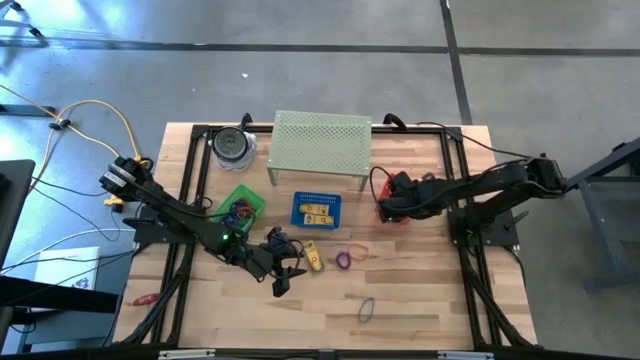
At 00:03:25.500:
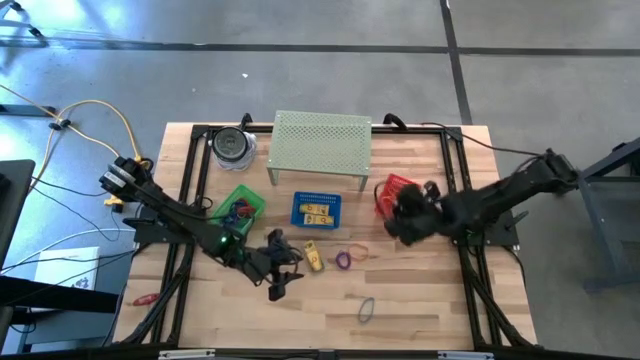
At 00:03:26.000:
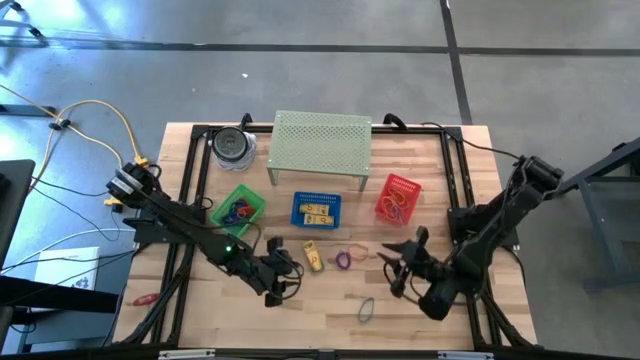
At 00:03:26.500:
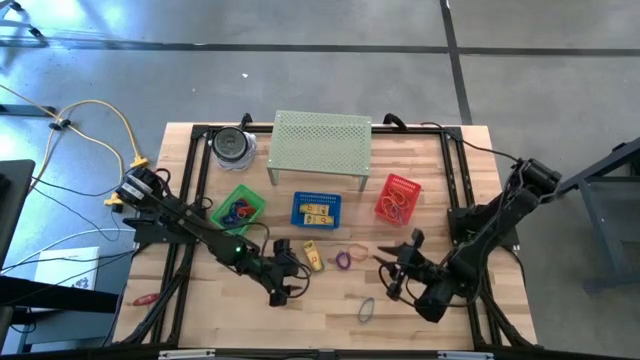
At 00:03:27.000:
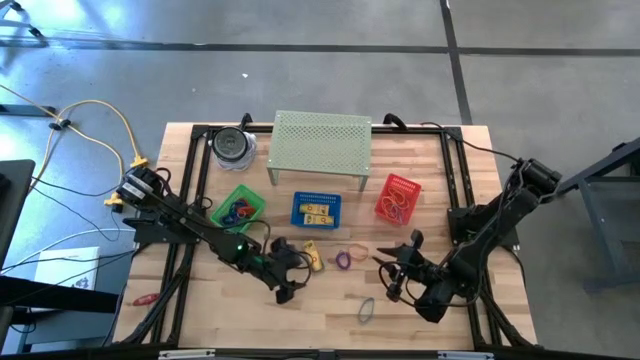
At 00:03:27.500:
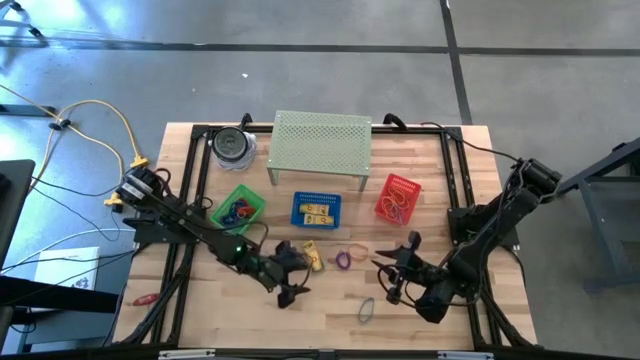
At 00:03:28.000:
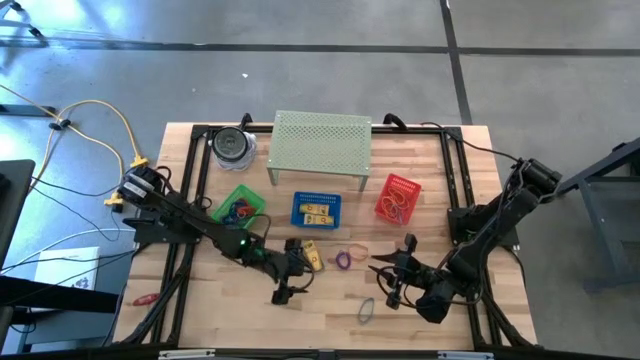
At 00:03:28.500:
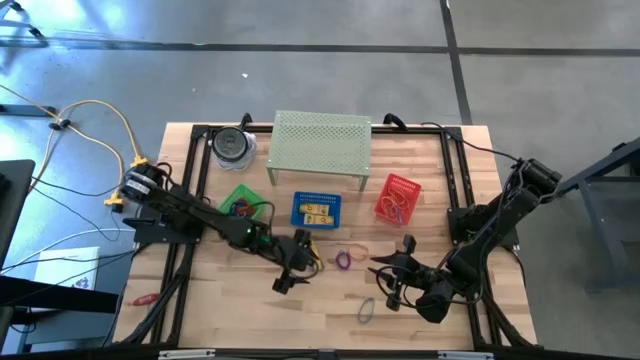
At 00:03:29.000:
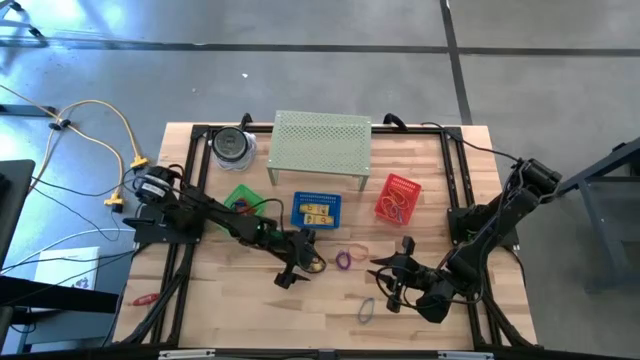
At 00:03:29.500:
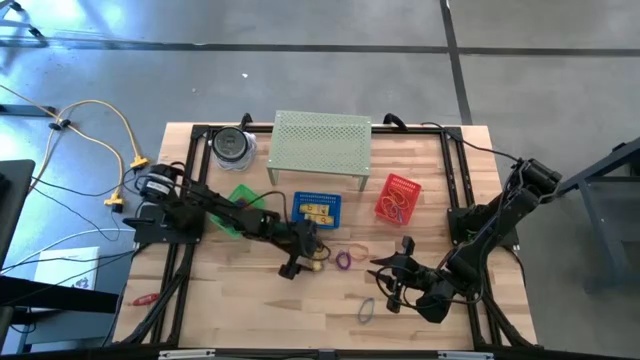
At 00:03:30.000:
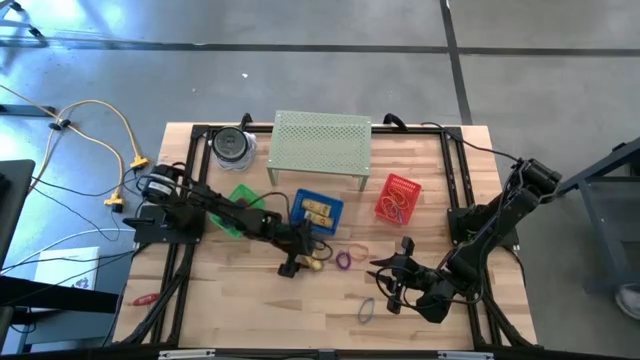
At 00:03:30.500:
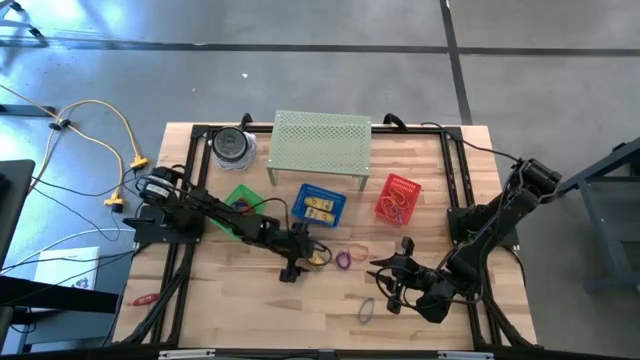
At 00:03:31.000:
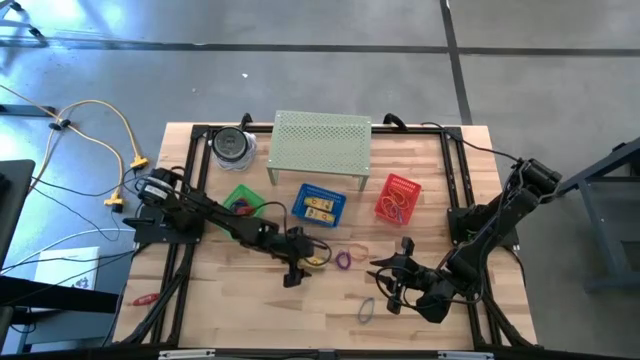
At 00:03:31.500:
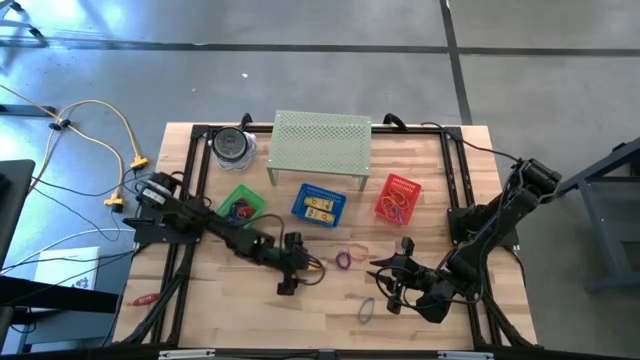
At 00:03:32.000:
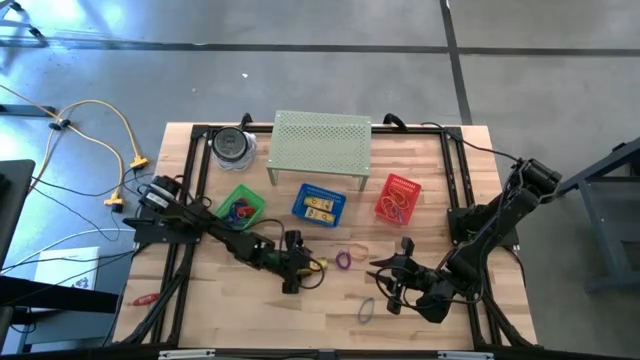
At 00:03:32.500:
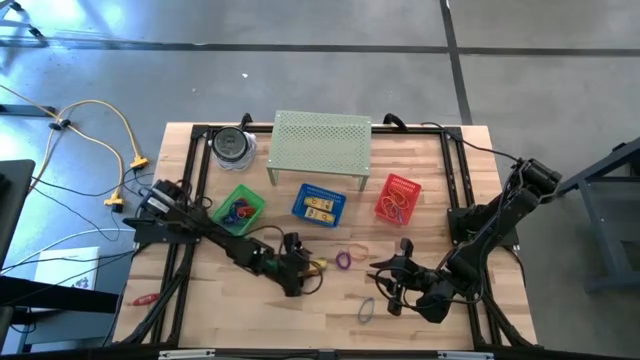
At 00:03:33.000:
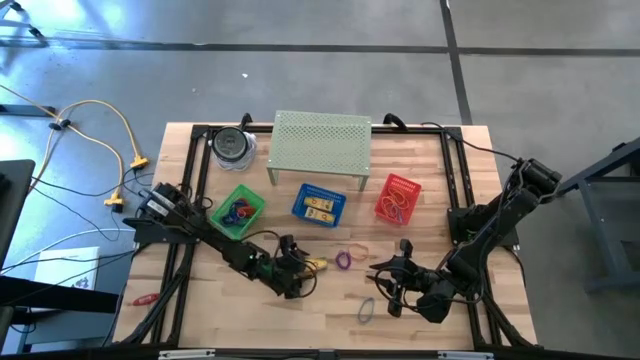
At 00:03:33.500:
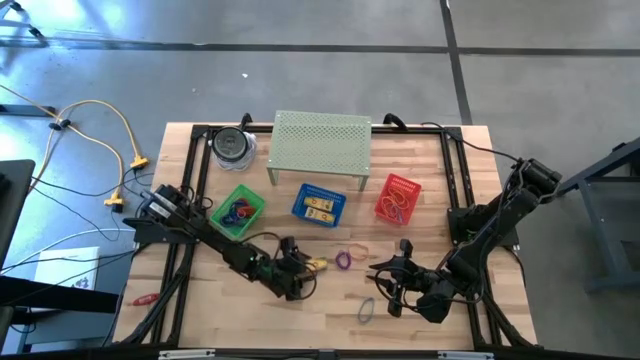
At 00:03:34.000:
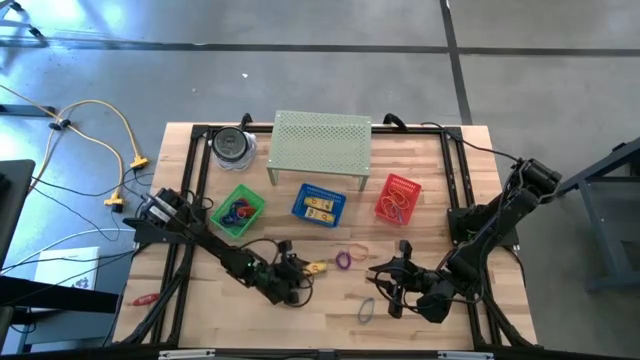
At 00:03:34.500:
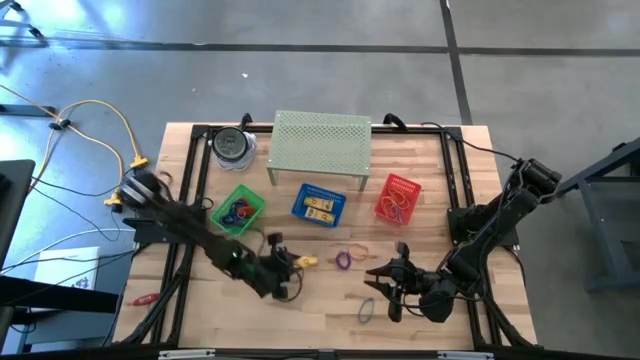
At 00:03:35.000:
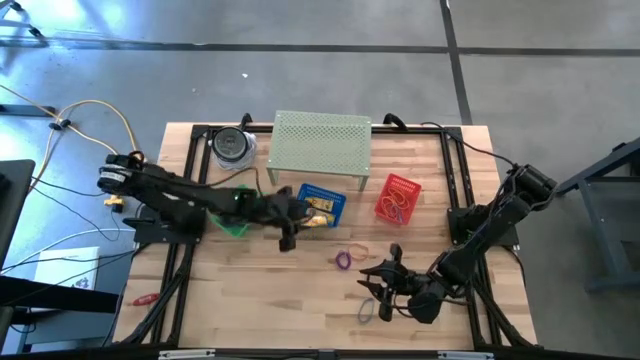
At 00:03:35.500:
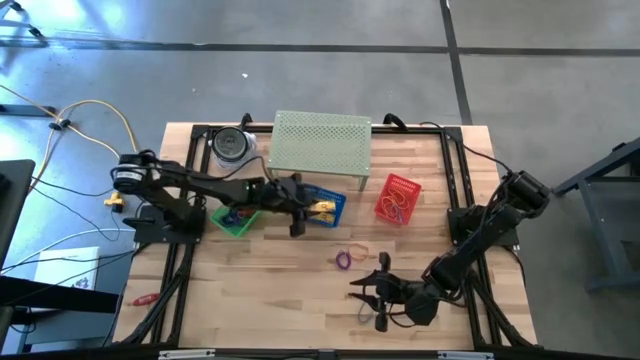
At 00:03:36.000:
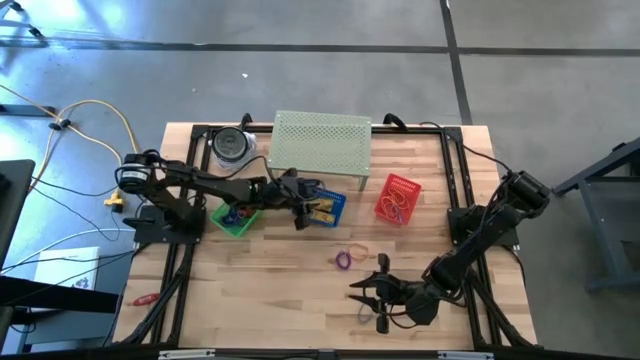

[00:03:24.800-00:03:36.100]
Task: Pick & Place Office Desk Supplies
Put the crayon box into the blue bin

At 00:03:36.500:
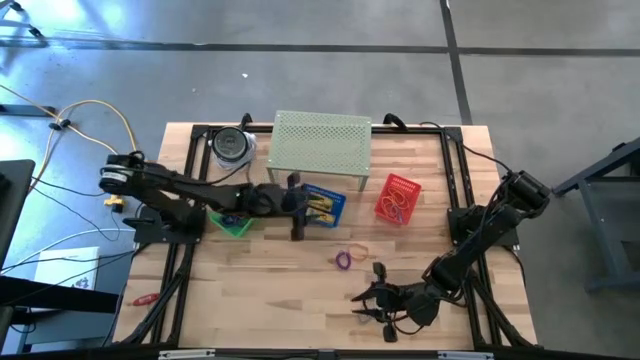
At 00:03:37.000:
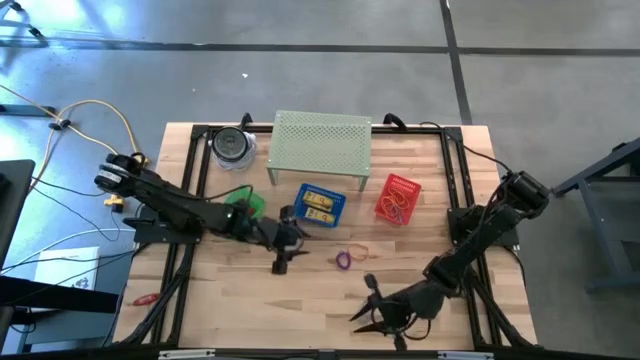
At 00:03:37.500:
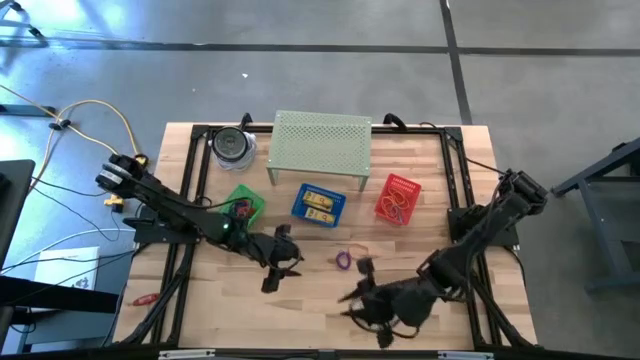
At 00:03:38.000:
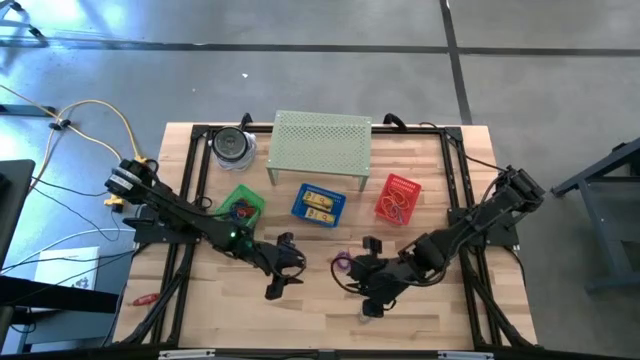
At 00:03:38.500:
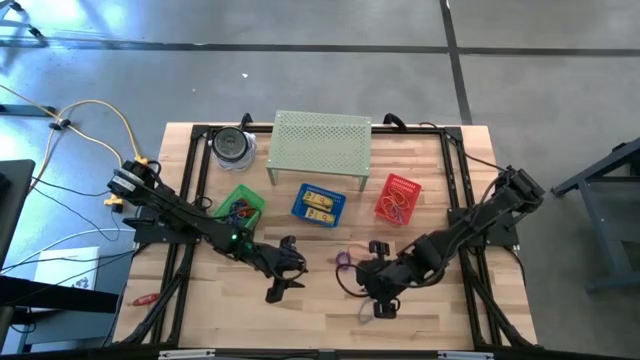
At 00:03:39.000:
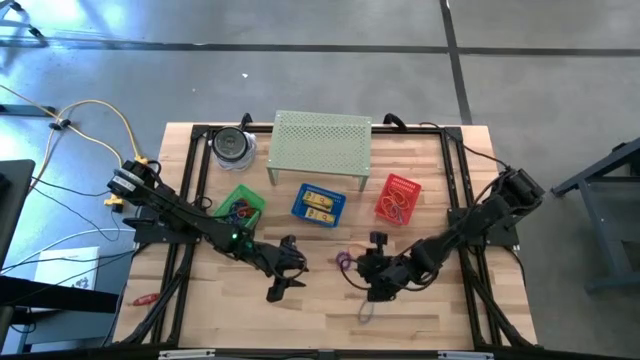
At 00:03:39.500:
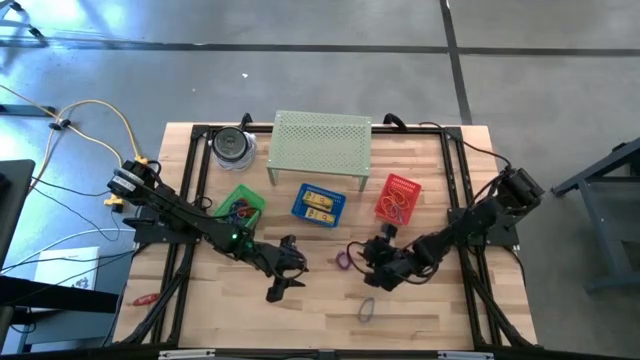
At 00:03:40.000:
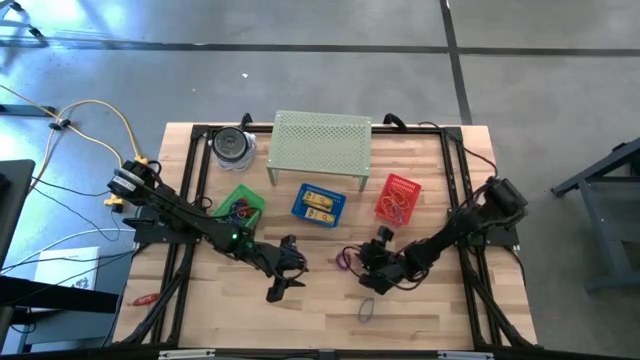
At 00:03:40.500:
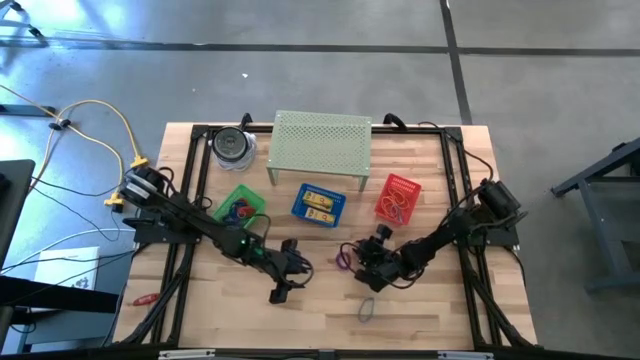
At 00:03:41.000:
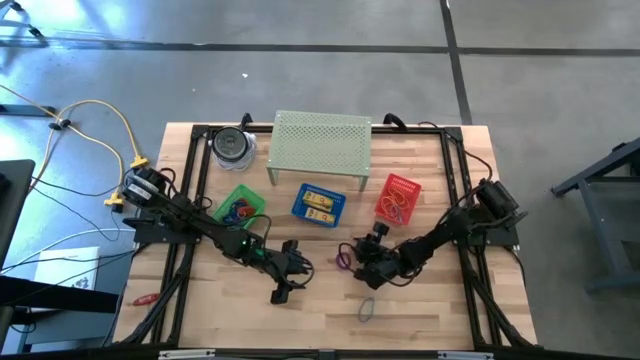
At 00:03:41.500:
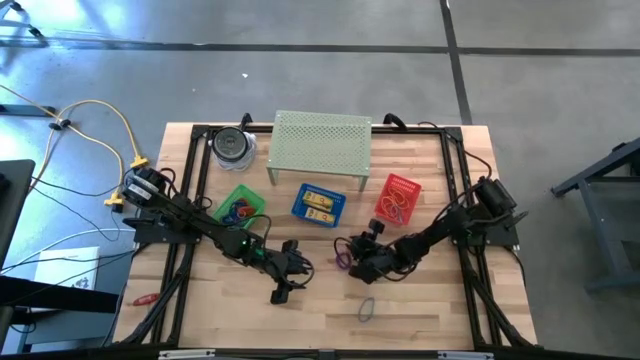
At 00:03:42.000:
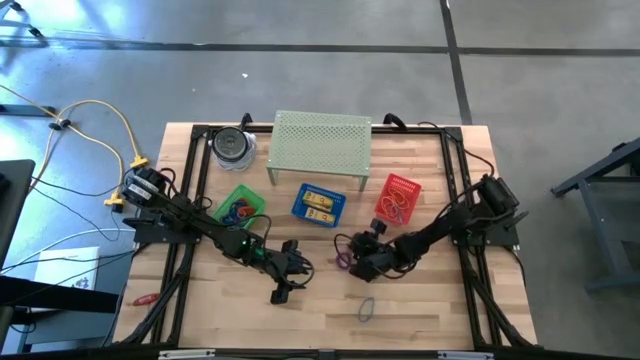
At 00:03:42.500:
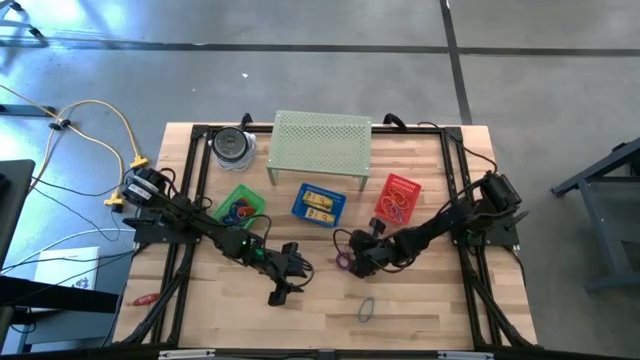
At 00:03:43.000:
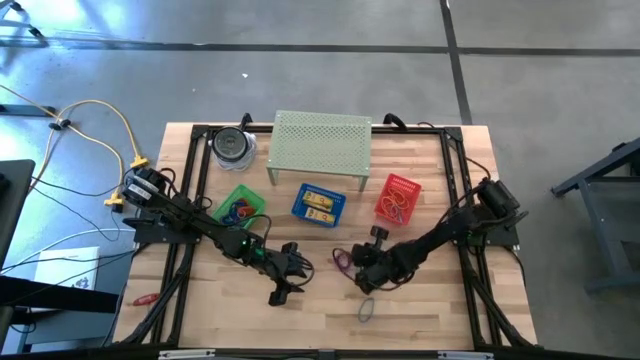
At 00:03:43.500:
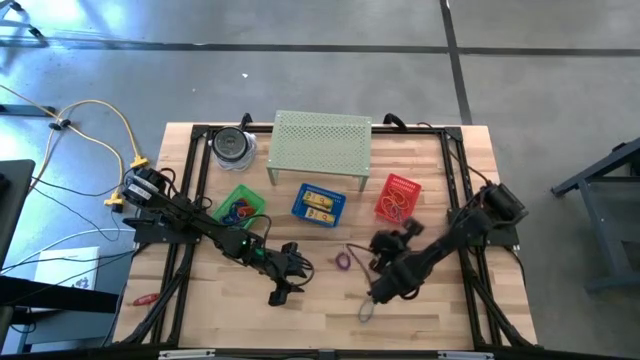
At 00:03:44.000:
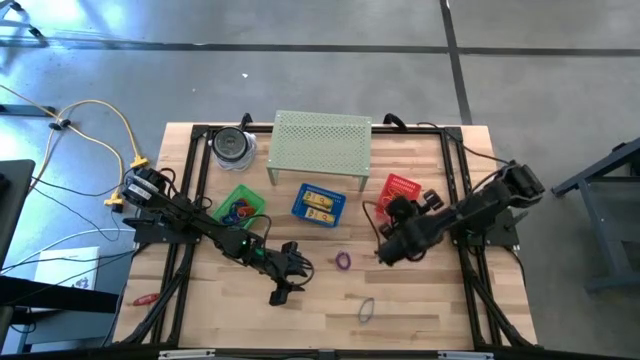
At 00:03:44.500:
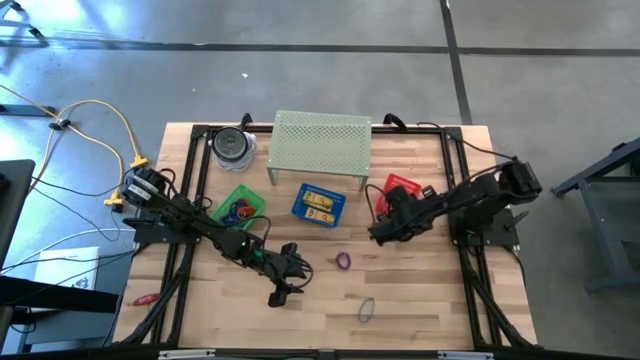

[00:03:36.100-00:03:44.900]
Put the orange rubber band into the red bin

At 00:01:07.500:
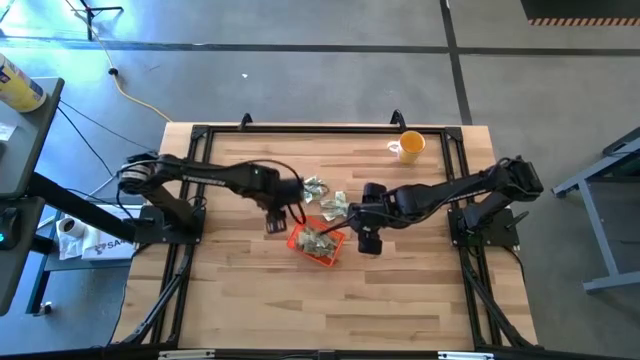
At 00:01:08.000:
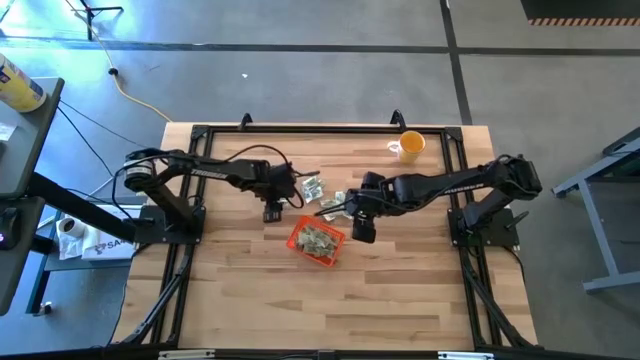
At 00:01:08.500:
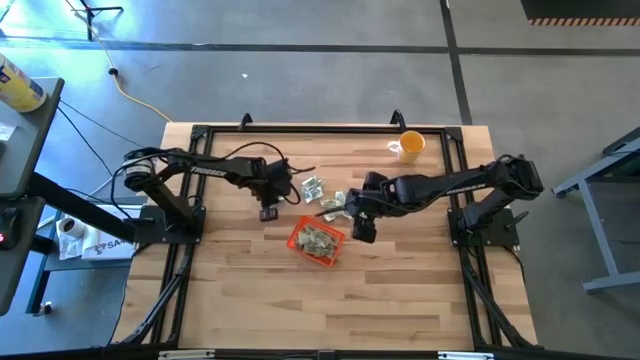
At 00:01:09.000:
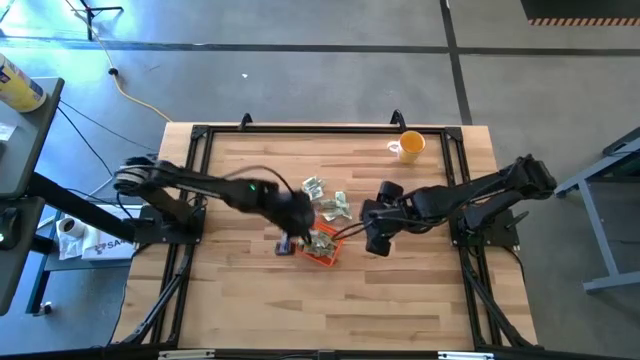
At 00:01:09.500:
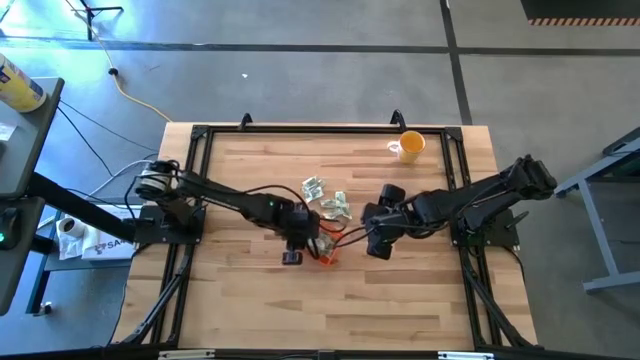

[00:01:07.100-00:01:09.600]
Task: Pick and place Stevia / Truvia into bins
Put the stevia packet into the orange bin
